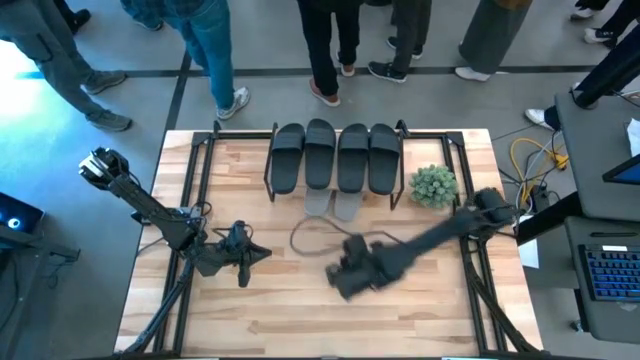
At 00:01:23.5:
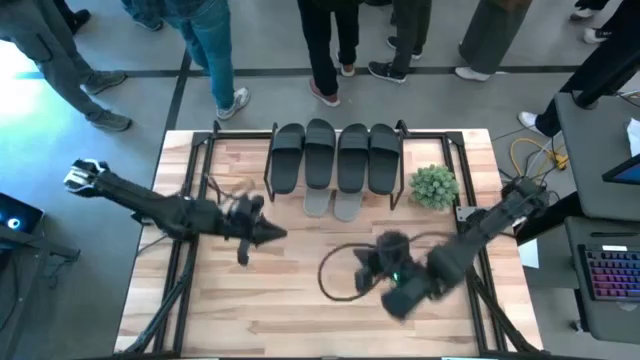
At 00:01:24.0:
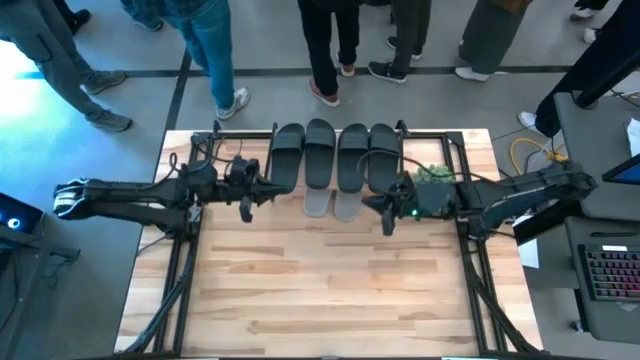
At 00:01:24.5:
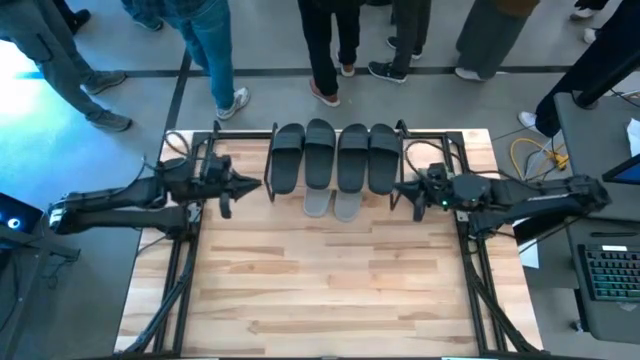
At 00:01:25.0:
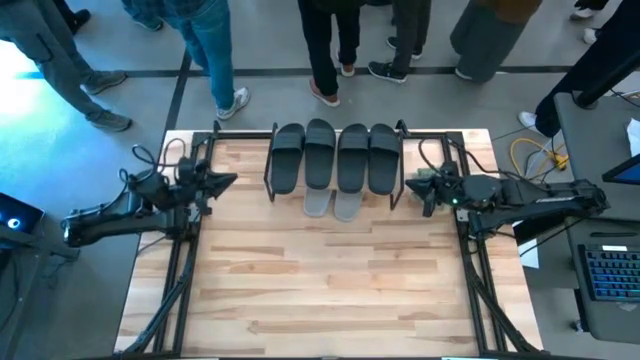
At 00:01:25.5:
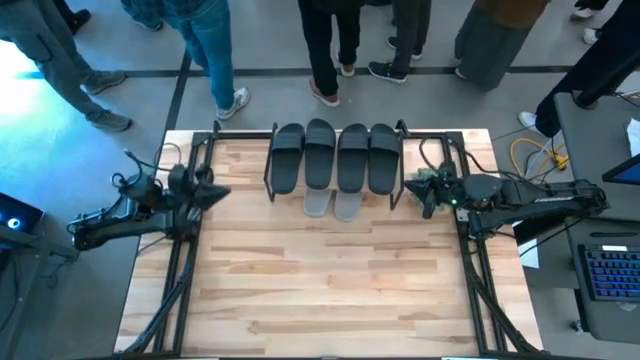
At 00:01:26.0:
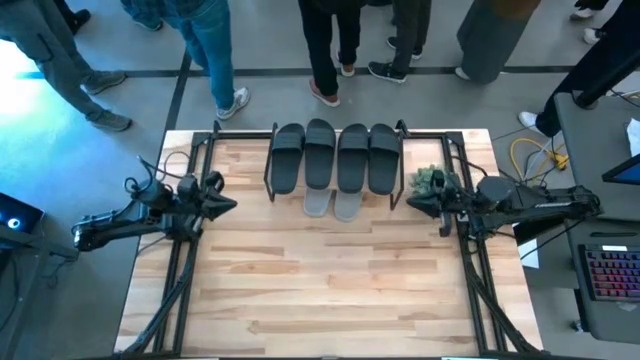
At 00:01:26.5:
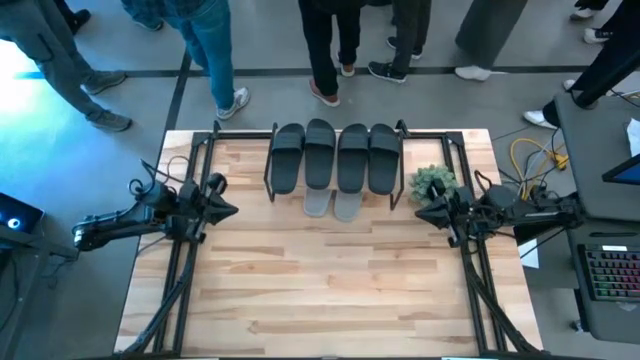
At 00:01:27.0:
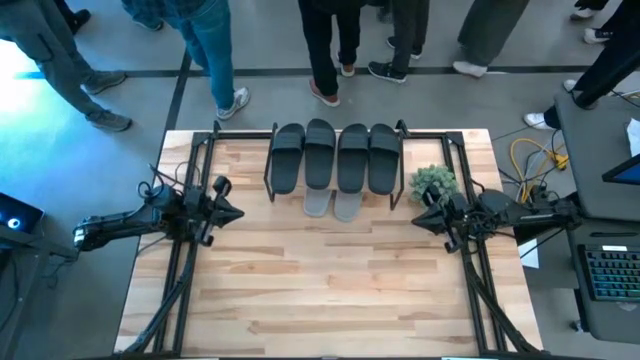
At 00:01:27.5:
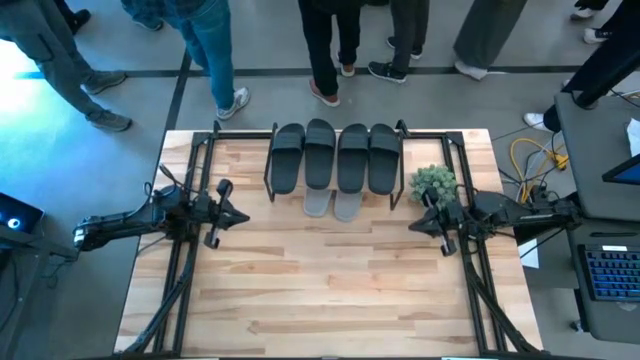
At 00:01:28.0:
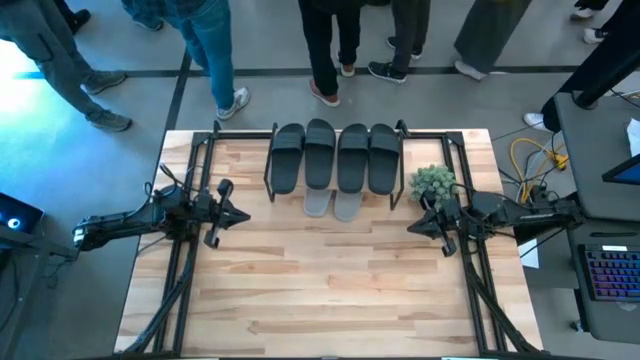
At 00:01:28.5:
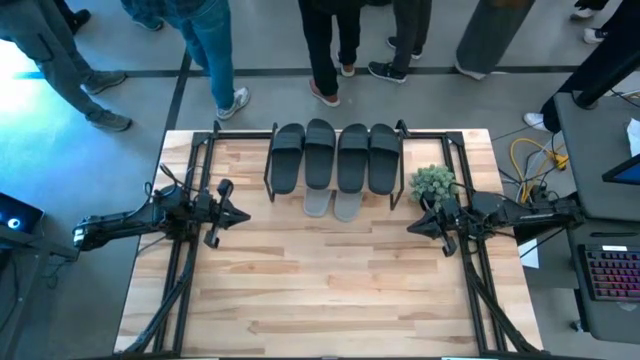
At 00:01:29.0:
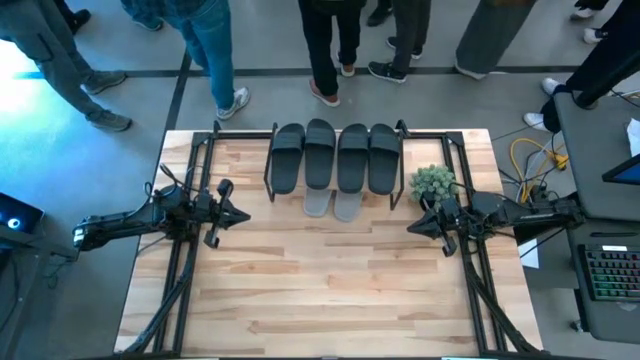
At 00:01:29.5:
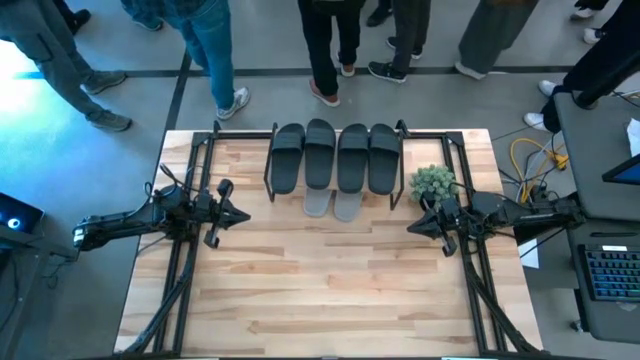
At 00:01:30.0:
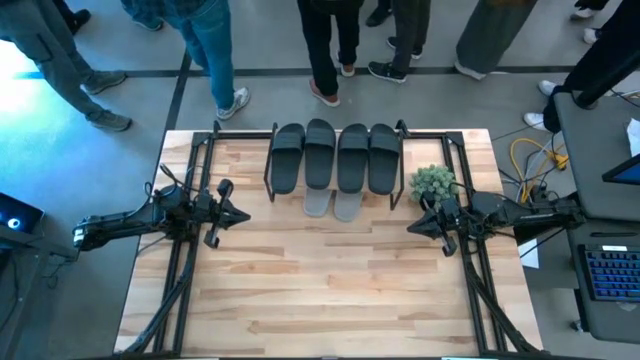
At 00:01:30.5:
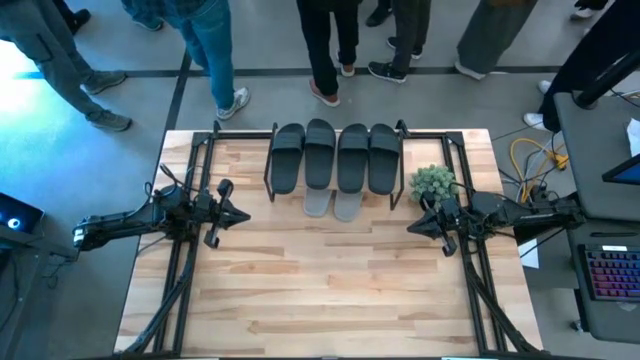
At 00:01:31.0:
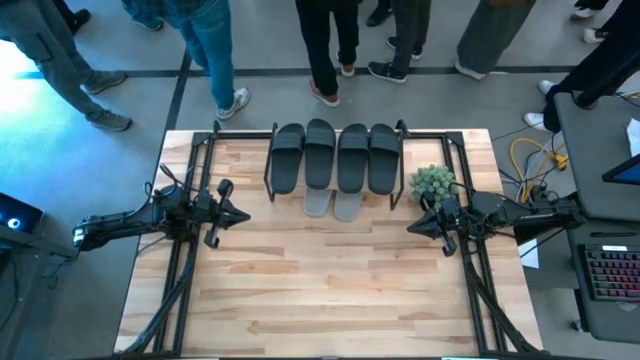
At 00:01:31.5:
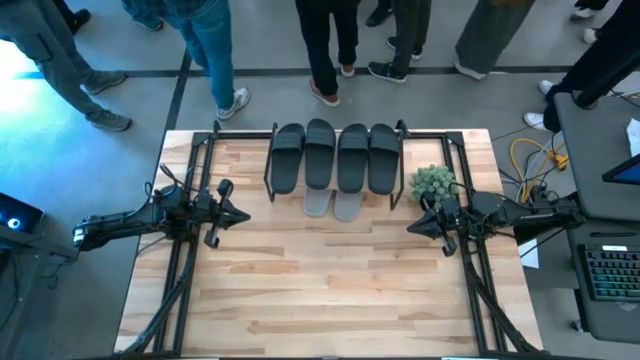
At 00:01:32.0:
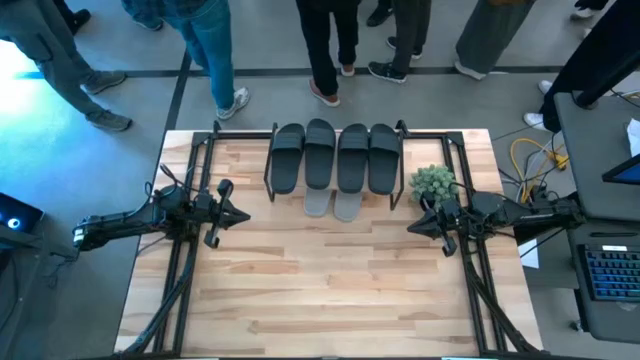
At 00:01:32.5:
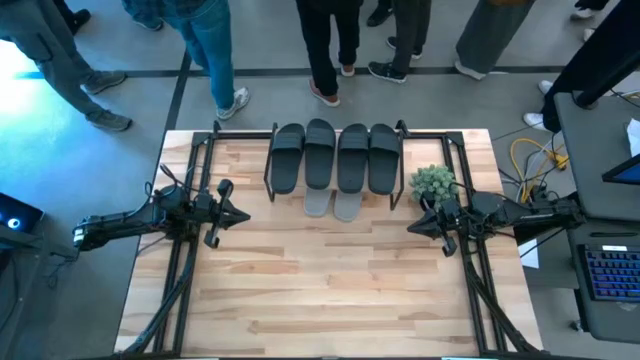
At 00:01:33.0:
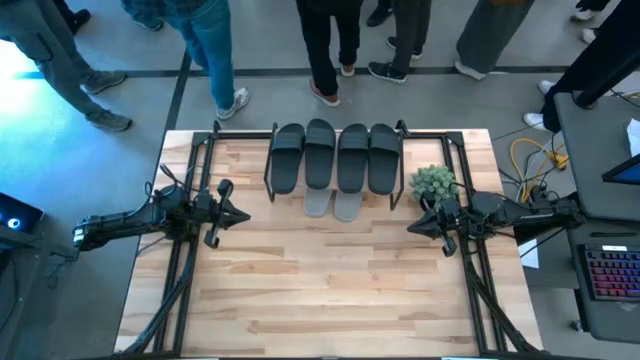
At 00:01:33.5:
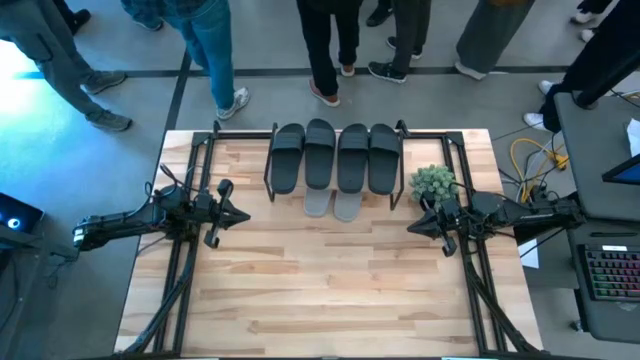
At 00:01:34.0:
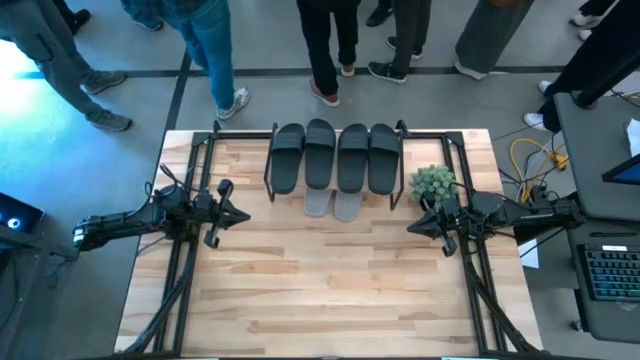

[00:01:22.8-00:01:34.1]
Task: Pick and place slides into the shelf
Return to Home Position

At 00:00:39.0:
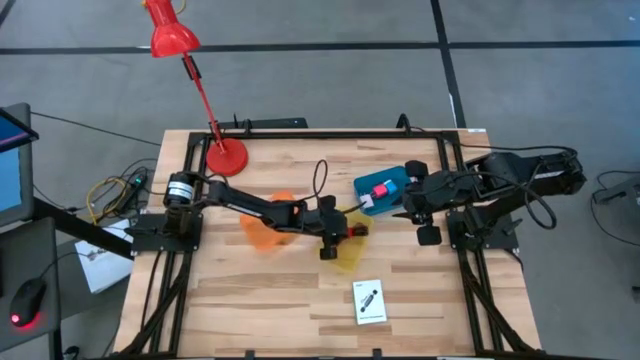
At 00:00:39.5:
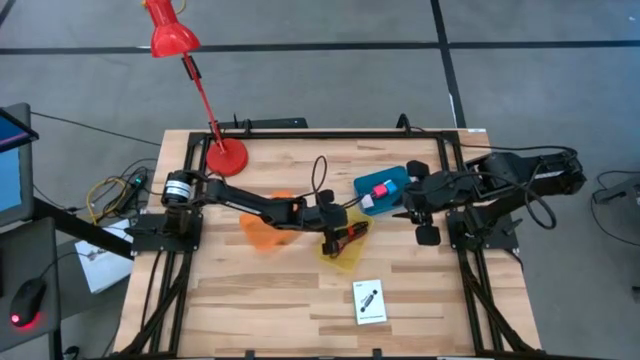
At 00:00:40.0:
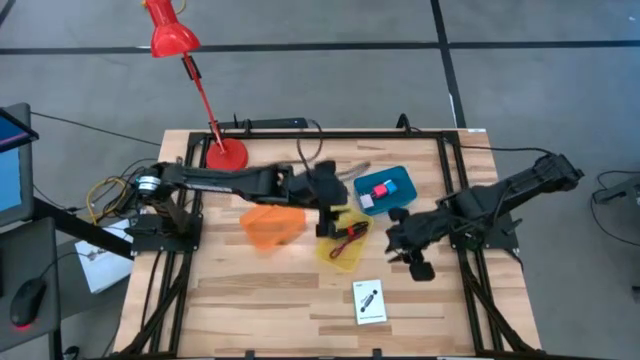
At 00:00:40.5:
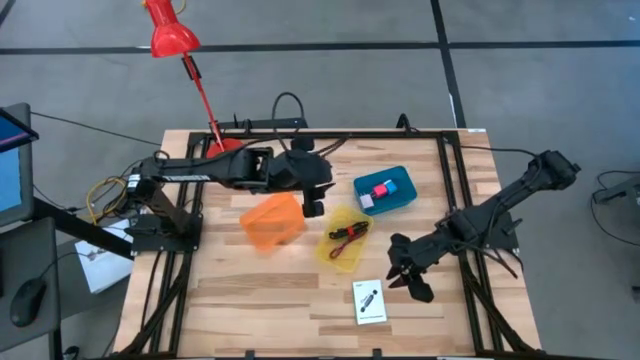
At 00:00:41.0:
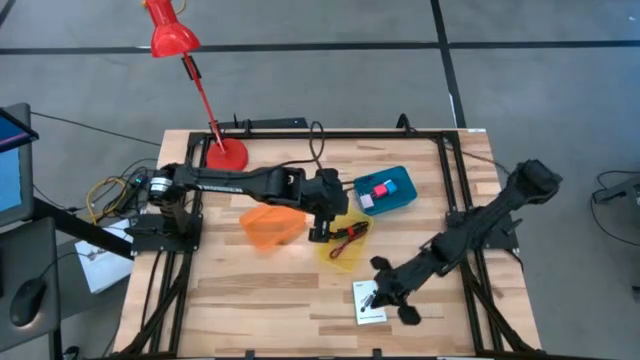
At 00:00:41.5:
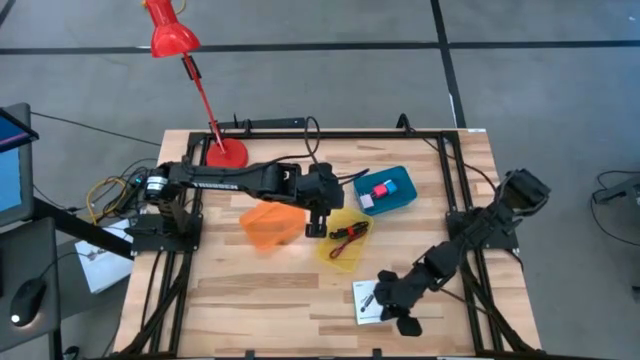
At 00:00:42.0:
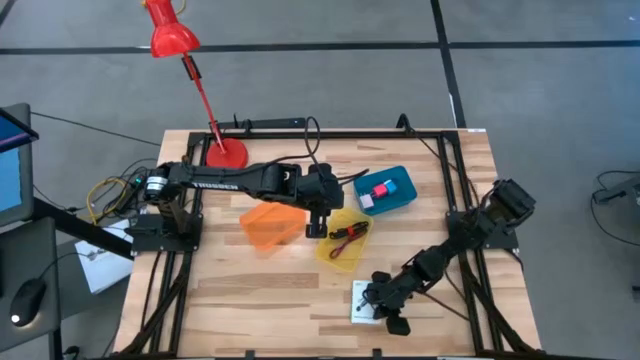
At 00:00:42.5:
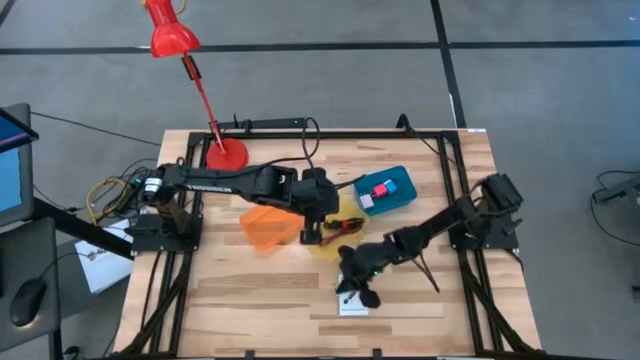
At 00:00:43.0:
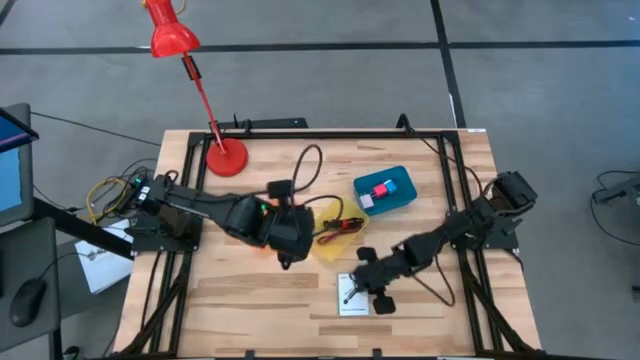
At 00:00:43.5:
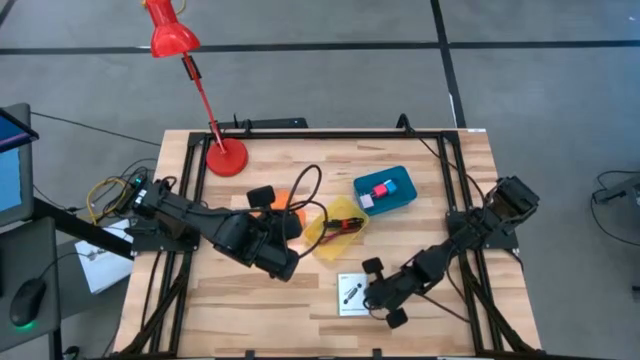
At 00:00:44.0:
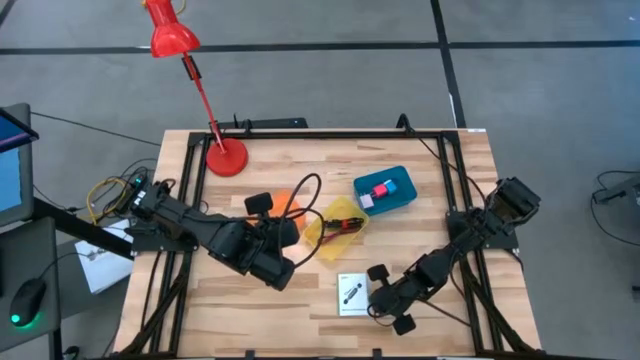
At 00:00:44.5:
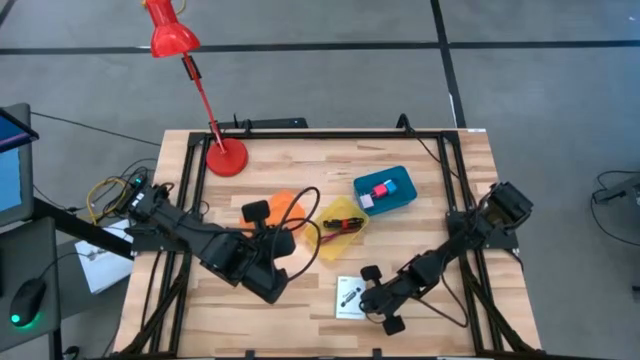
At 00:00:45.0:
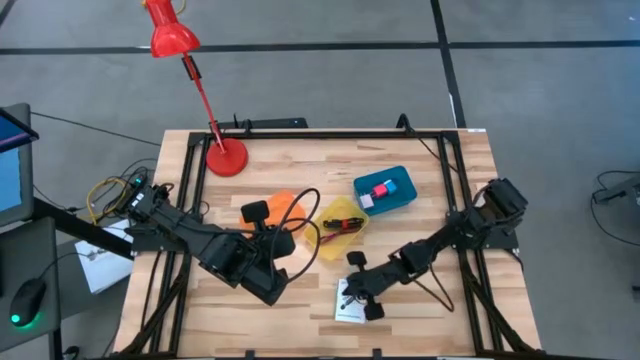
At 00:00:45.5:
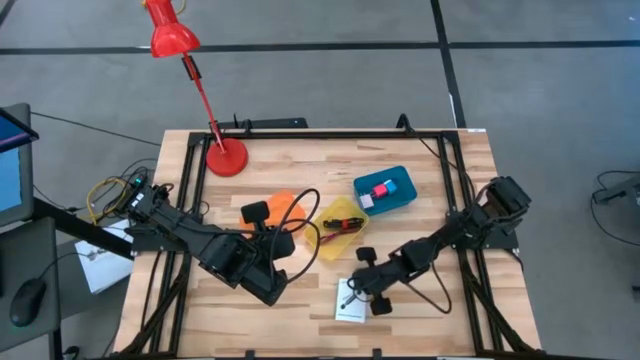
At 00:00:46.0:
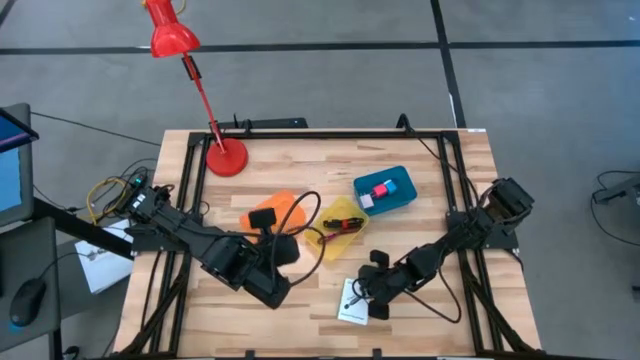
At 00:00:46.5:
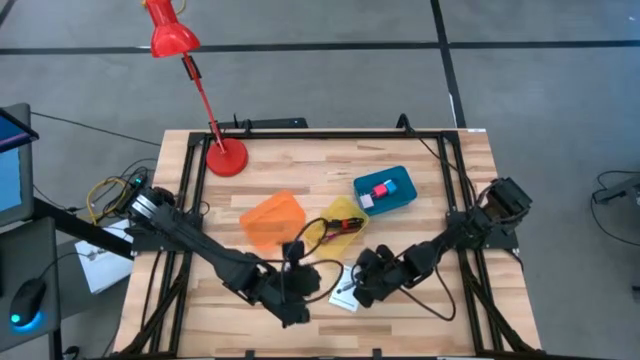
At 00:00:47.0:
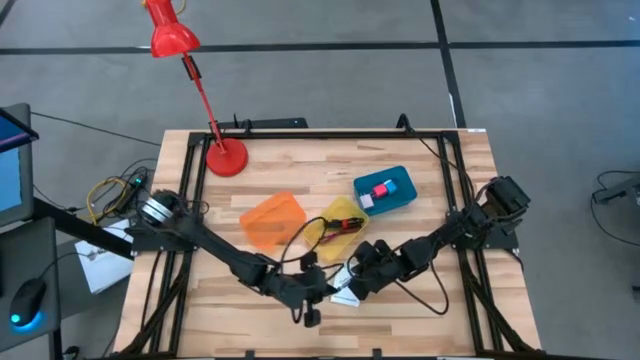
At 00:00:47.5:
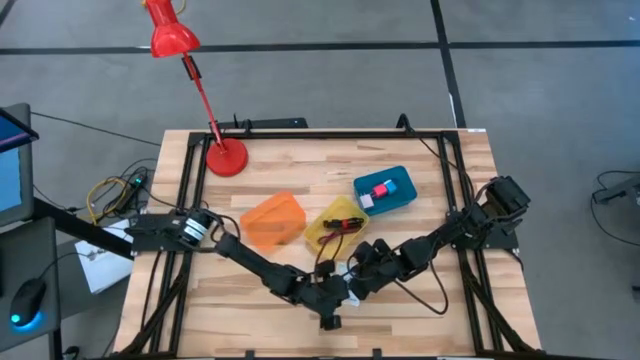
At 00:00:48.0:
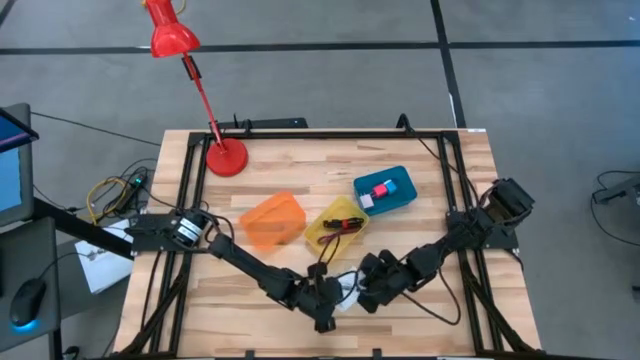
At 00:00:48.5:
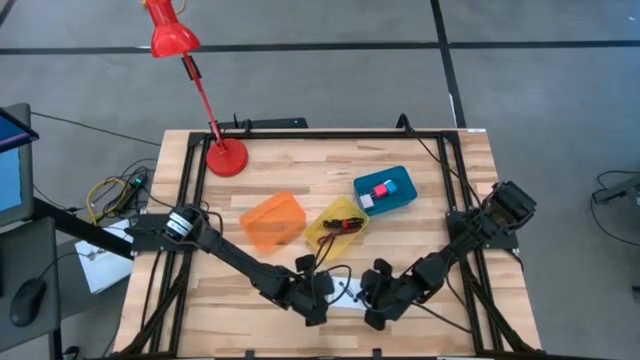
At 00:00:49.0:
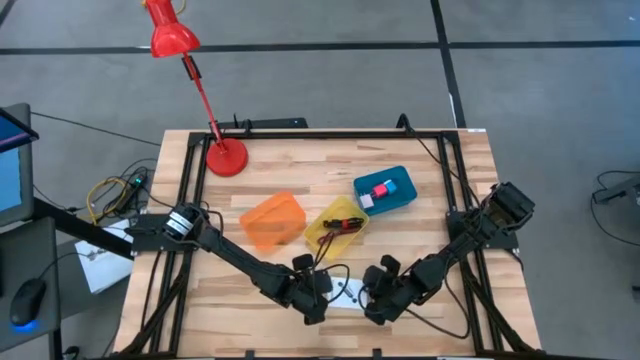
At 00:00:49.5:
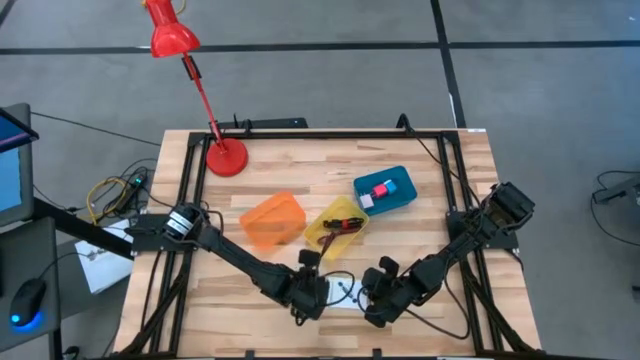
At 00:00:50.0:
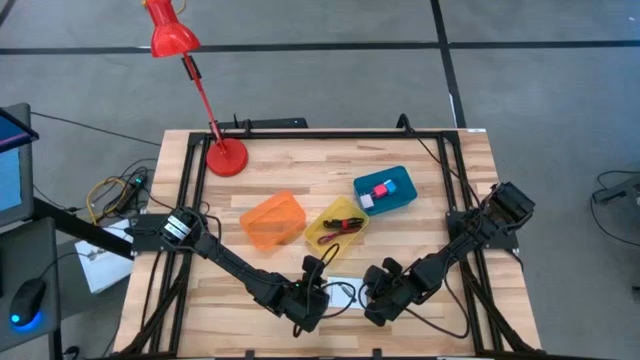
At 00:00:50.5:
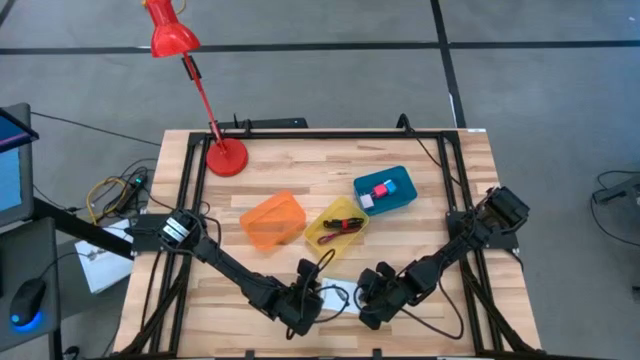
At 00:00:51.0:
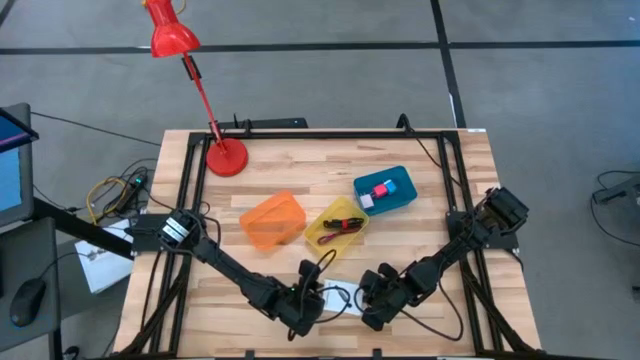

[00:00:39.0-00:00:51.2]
Task: Pick and place items into bin
Put the card reader box into the orange bin
